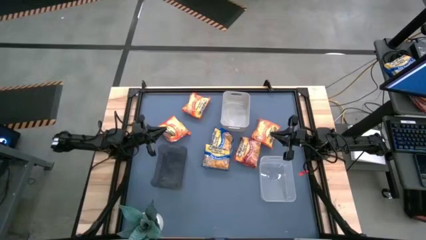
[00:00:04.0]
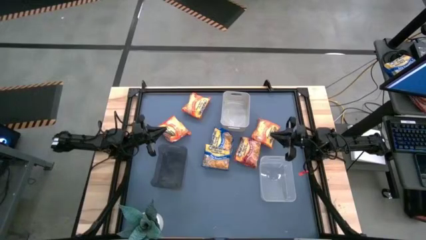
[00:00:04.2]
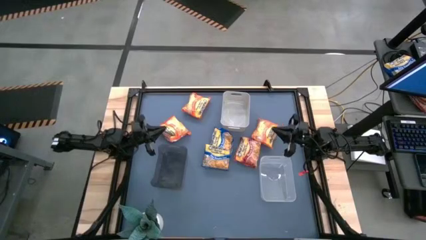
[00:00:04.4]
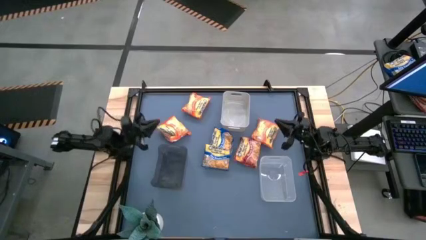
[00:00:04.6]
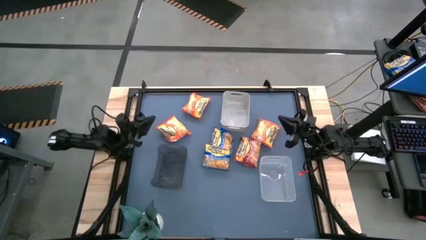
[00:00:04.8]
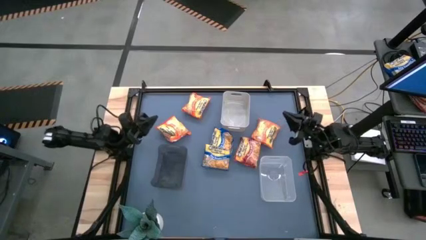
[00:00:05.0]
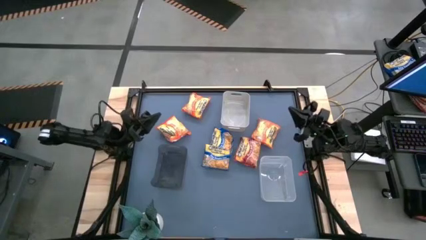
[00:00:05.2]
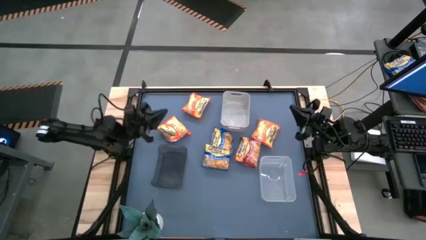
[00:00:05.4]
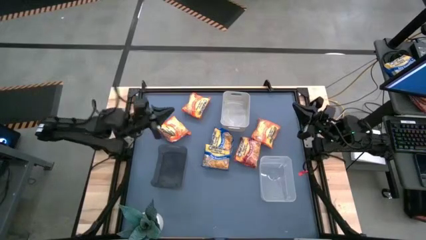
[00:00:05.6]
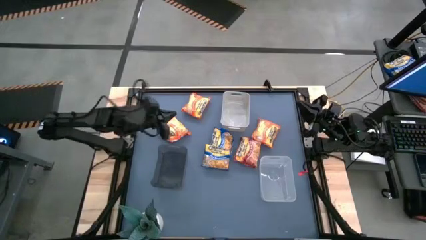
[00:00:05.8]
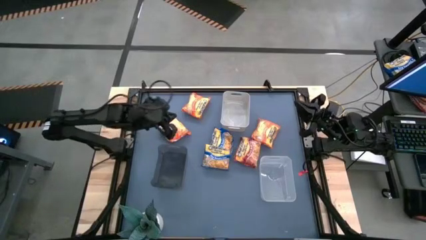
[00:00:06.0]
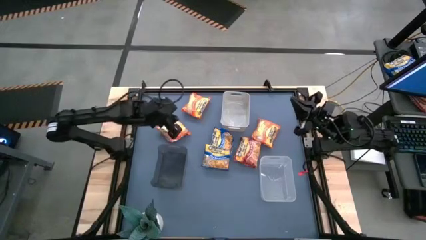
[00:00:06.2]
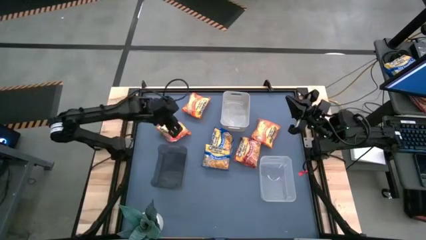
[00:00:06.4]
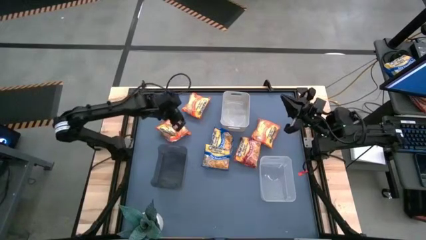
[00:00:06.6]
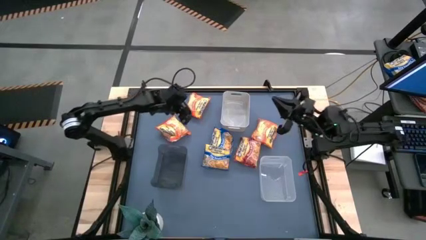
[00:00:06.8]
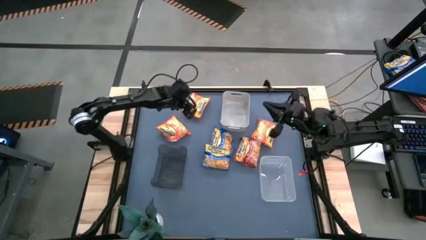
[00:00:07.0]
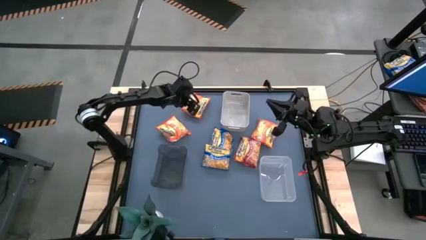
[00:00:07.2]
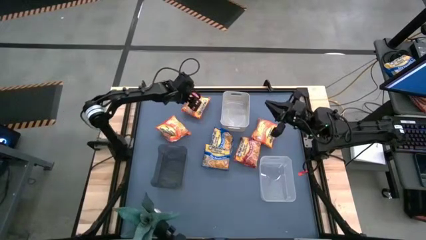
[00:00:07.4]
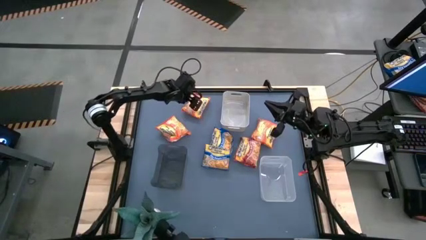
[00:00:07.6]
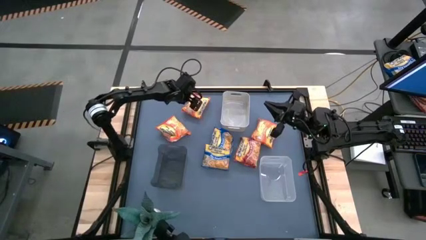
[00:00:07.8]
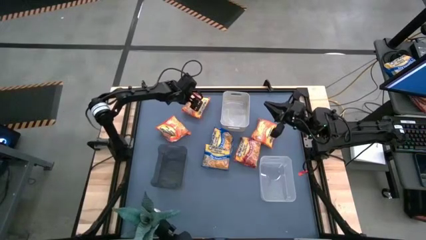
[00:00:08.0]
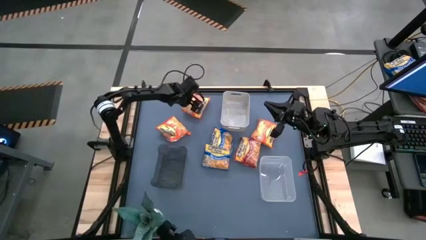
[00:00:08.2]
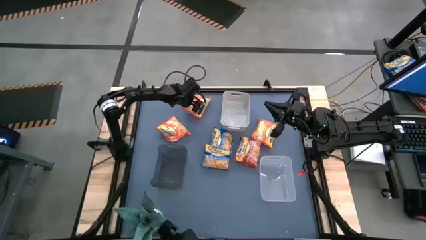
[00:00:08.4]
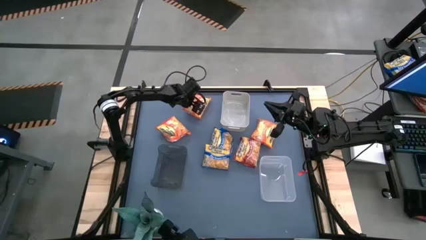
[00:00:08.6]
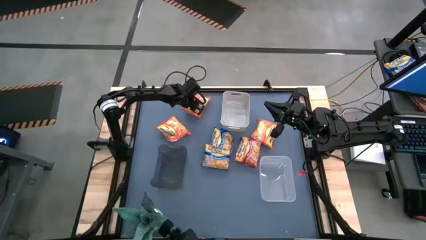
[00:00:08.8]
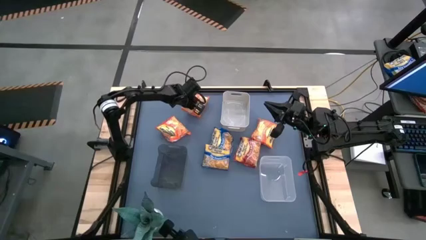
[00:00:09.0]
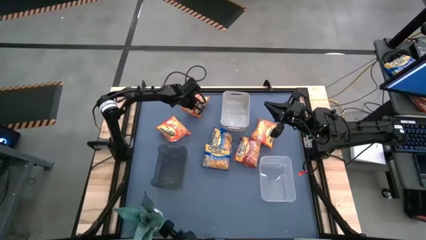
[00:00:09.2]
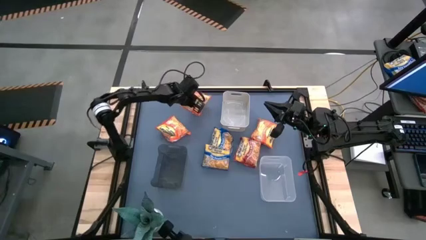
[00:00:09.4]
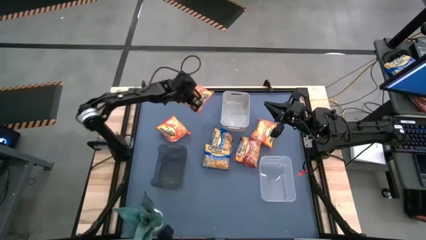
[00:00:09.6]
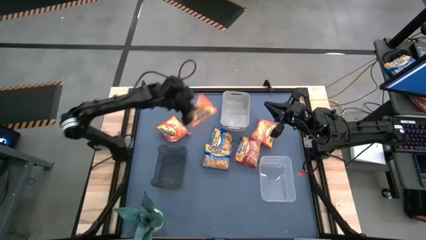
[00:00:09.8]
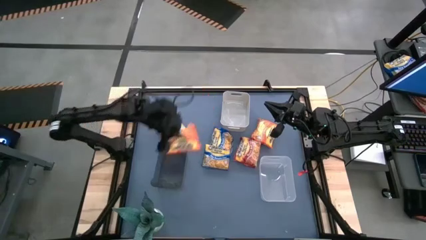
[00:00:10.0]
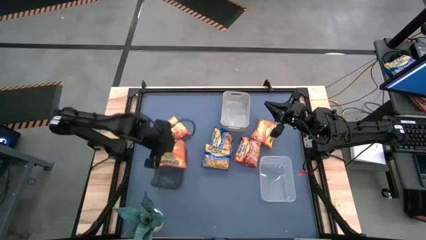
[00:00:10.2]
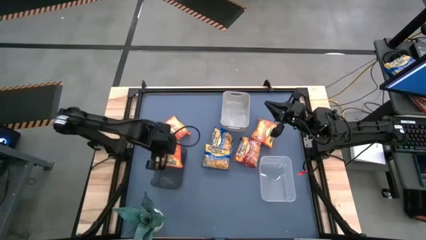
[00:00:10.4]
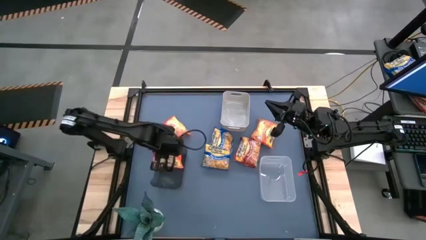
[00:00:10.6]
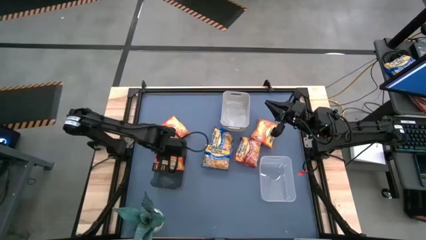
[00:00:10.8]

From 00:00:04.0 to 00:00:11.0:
Task: Sort Maruchan noodles
Put the top orange noodle pack into the black bin

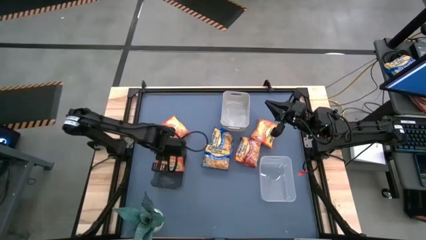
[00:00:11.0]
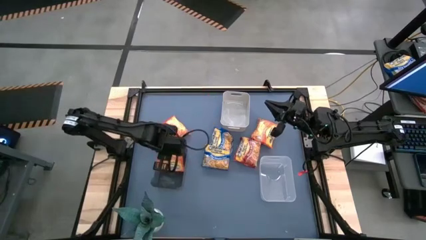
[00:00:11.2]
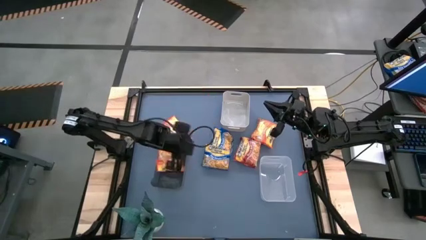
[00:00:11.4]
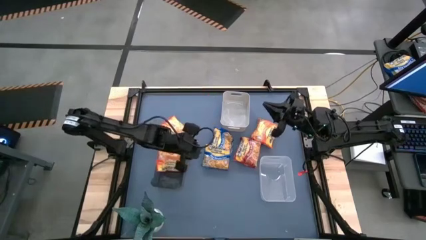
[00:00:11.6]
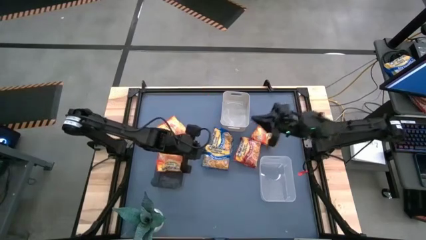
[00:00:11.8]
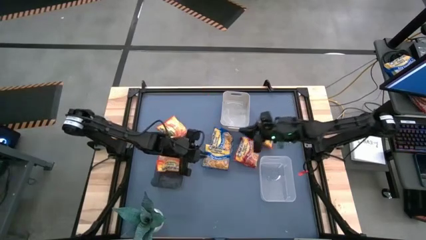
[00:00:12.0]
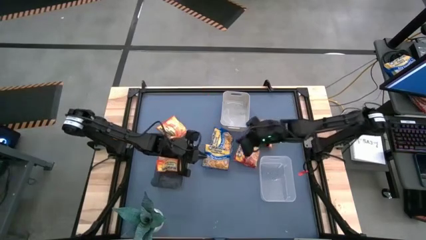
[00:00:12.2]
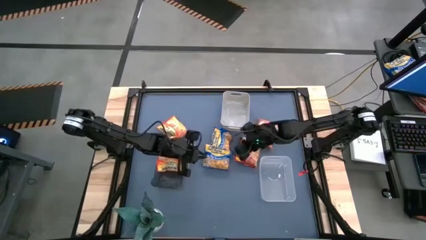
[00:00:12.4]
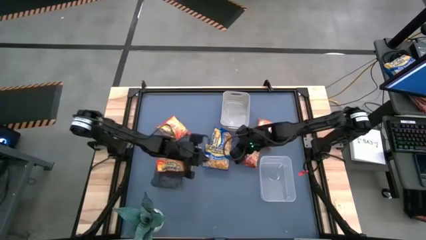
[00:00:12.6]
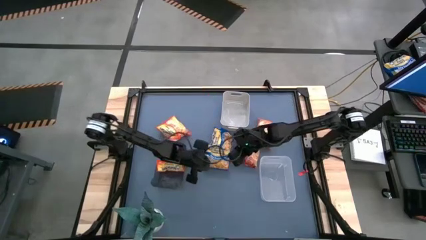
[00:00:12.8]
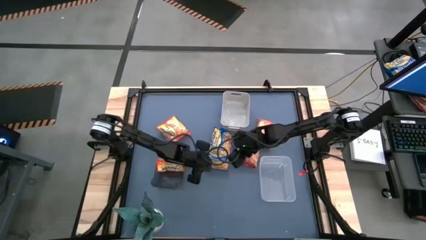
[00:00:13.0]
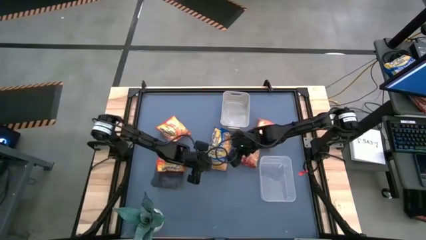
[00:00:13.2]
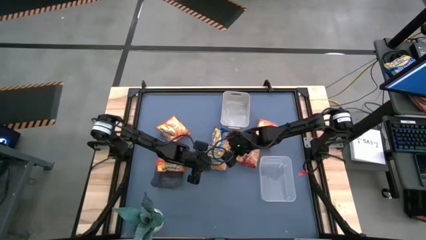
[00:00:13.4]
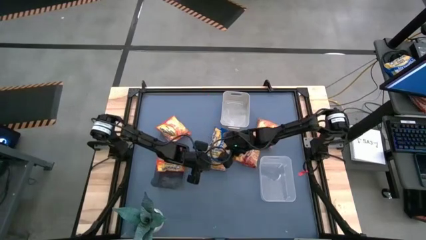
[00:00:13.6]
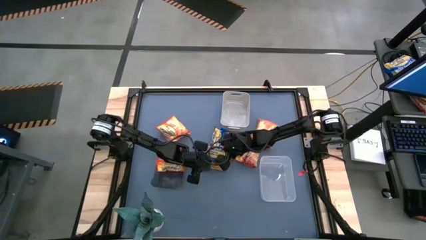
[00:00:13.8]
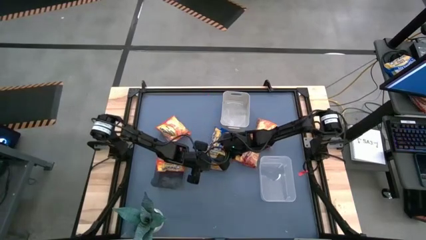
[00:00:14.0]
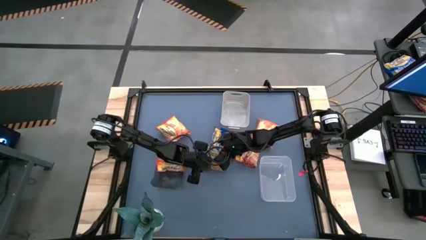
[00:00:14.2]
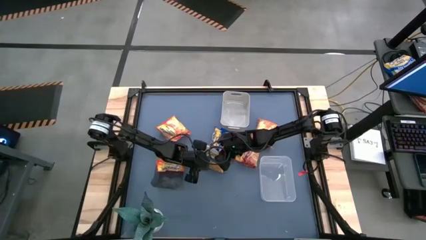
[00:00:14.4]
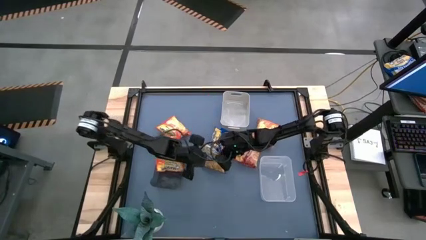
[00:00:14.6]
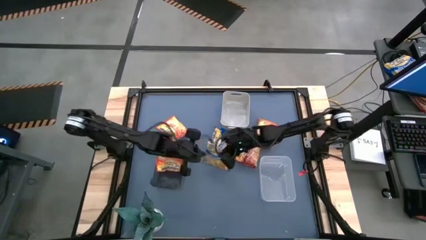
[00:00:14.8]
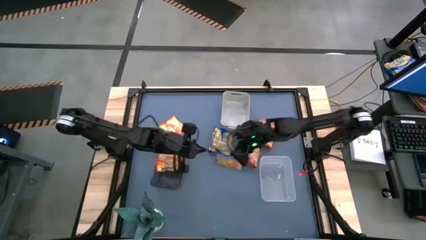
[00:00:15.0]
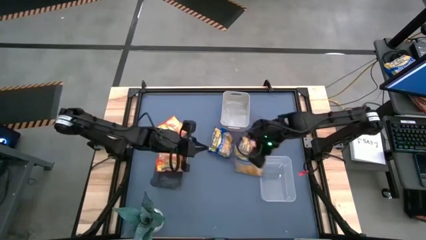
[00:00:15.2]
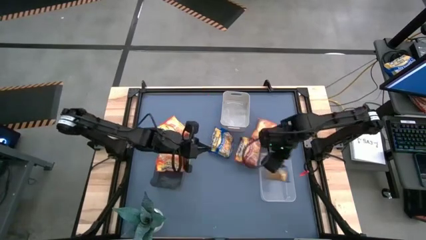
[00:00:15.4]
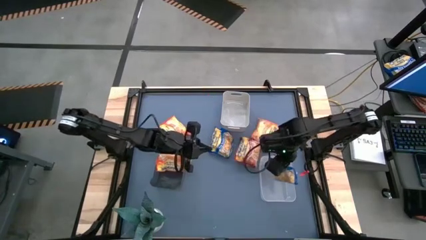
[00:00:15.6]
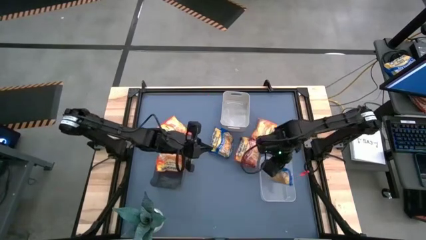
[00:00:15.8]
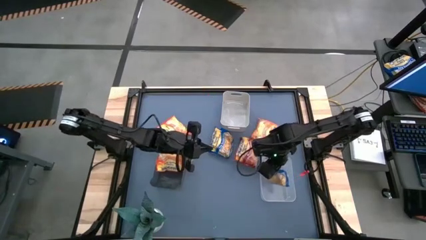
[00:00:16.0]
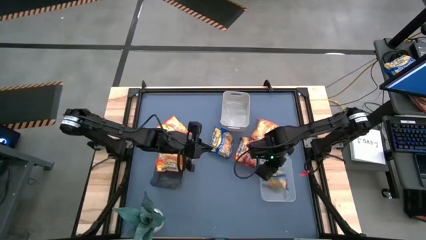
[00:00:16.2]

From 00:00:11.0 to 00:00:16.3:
Put the bottom blue noodle pack into the transparent bin

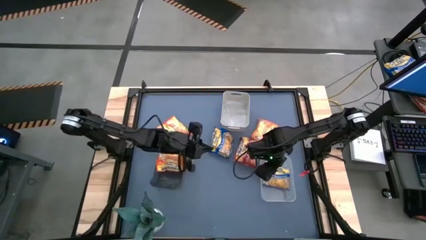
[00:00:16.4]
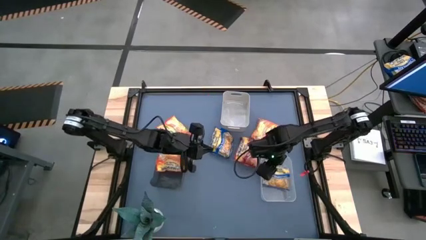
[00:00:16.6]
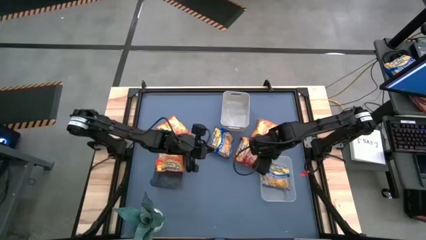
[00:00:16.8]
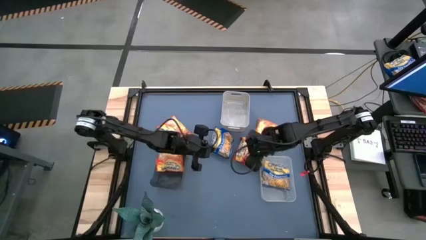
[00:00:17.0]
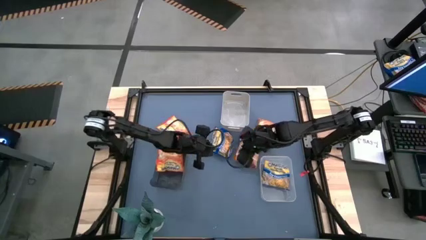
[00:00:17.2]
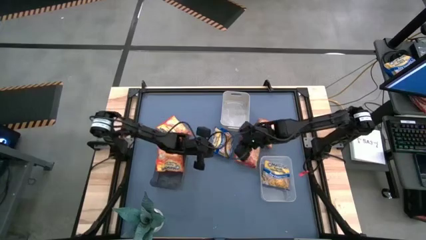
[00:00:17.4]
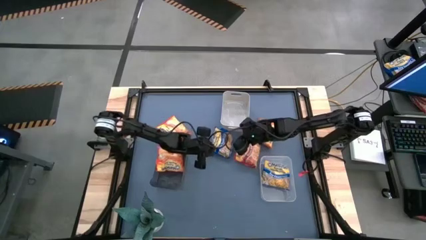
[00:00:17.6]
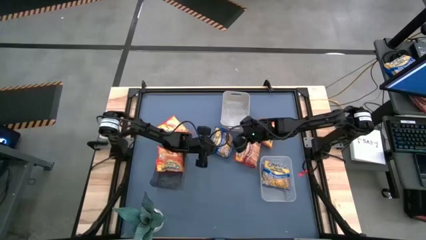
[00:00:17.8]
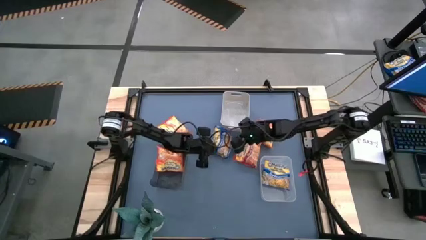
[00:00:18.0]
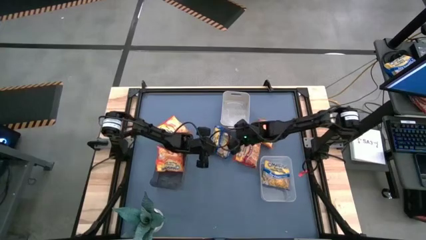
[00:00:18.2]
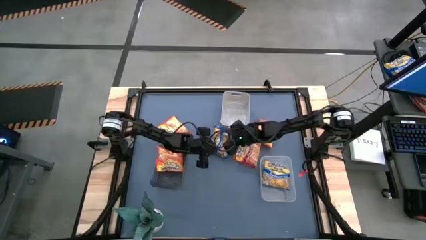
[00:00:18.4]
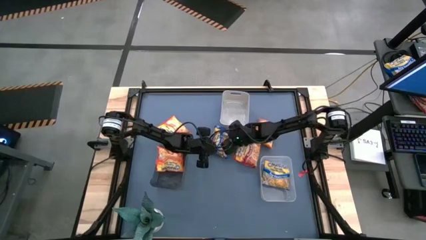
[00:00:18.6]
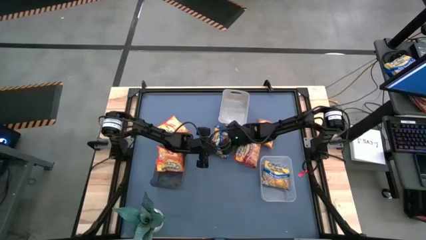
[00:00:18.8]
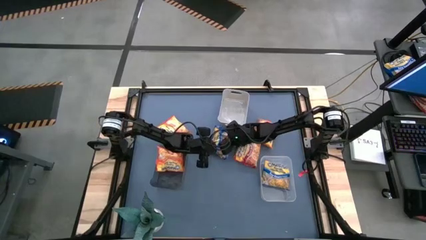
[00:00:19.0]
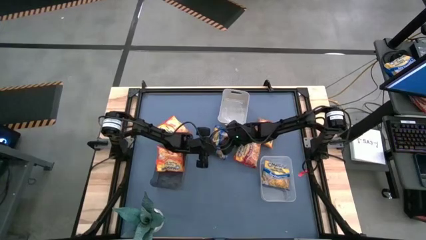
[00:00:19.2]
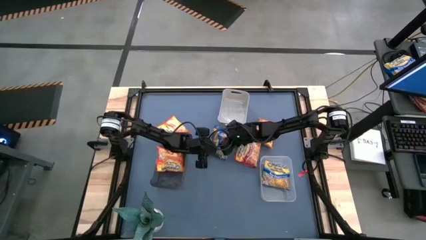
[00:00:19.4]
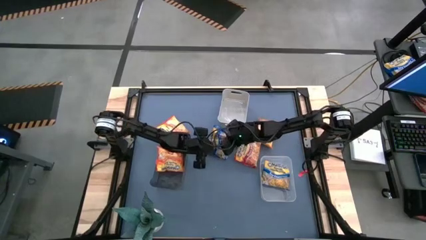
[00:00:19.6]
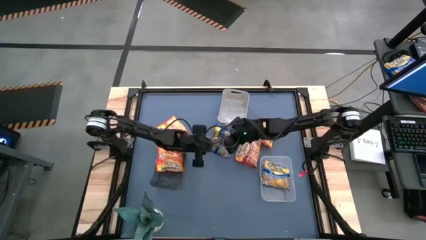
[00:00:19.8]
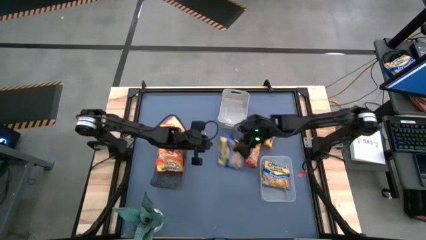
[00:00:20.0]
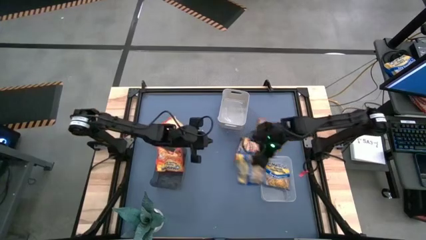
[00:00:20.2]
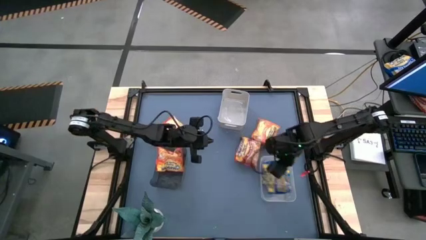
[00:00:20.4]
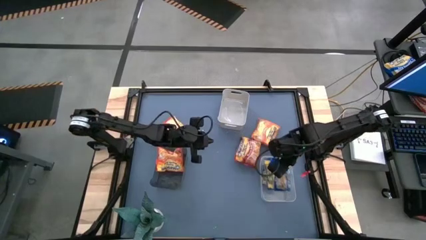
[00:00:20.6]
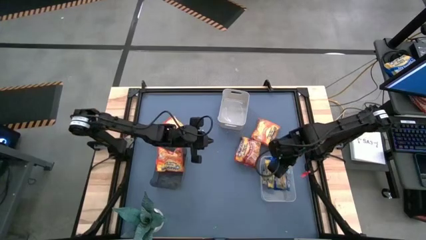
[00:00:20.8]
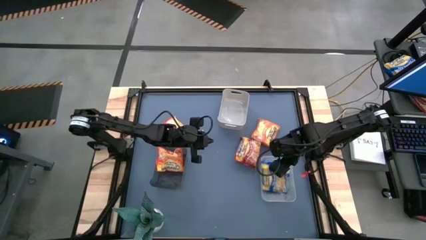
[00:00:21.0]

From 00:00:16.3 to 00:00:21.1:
Put the blue noodle pack into the transparent bin

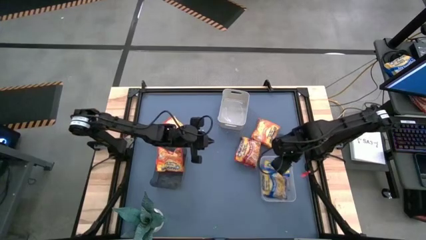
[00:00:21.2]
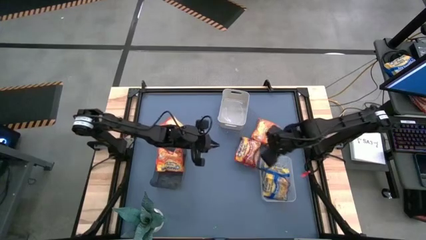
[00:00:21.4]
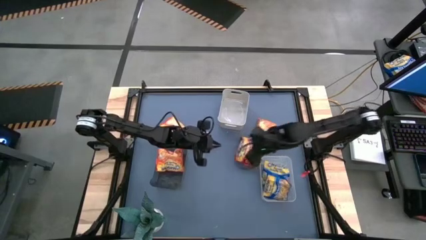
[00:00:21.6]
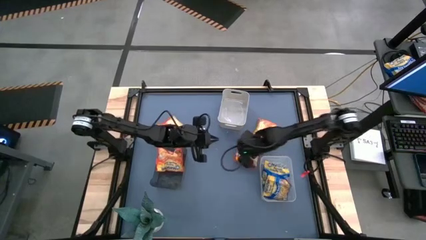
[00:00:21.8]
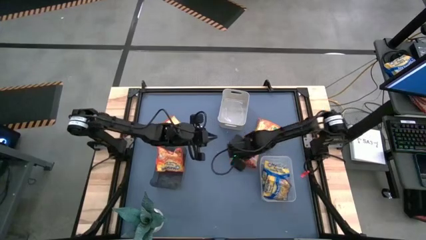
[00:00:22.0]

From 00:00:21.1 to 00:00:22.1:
Put the red noodle pack into the gray bin
